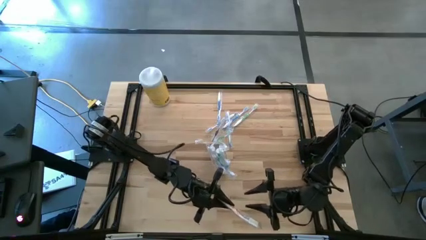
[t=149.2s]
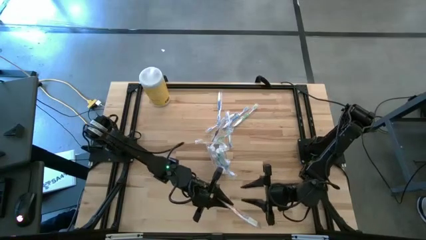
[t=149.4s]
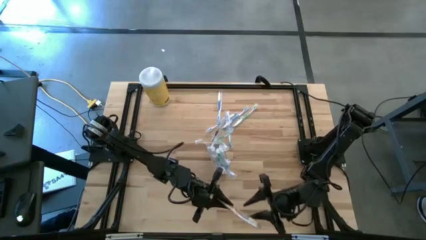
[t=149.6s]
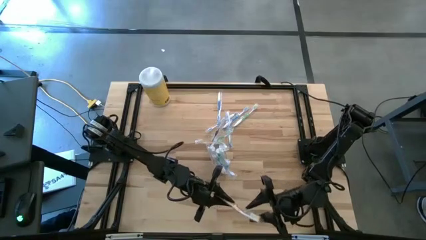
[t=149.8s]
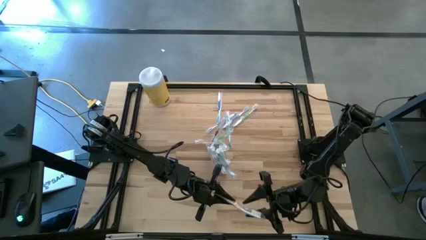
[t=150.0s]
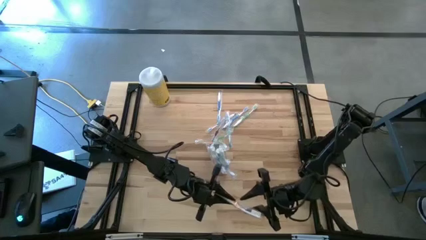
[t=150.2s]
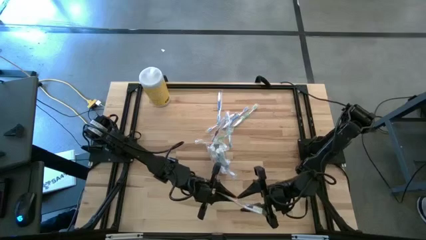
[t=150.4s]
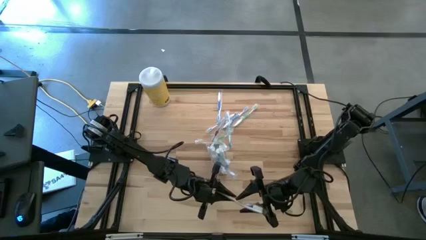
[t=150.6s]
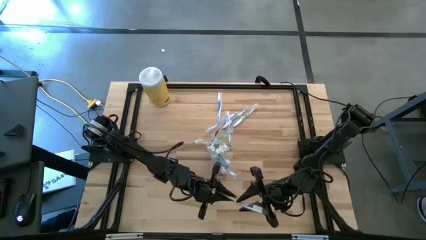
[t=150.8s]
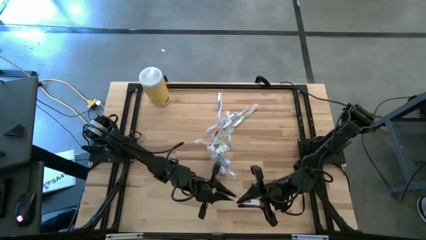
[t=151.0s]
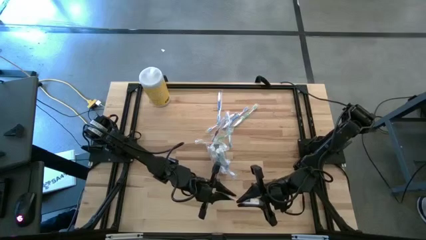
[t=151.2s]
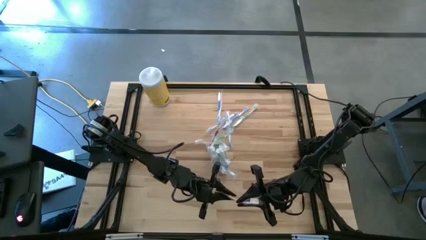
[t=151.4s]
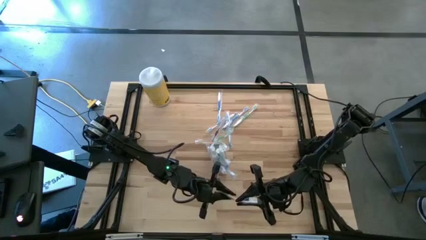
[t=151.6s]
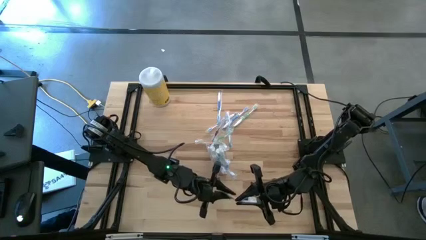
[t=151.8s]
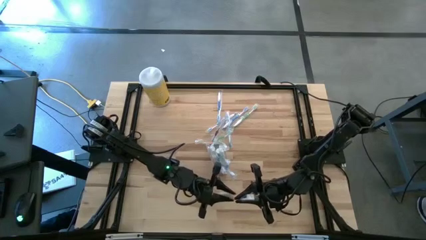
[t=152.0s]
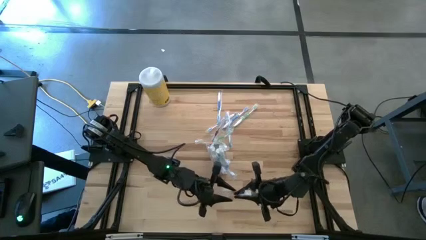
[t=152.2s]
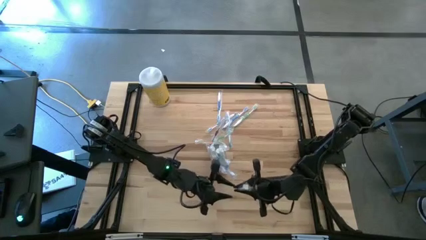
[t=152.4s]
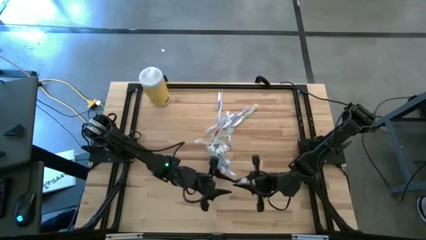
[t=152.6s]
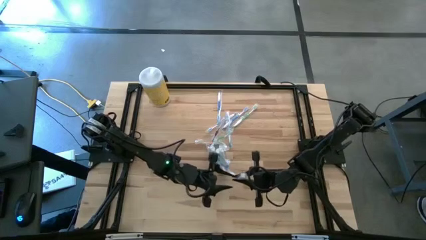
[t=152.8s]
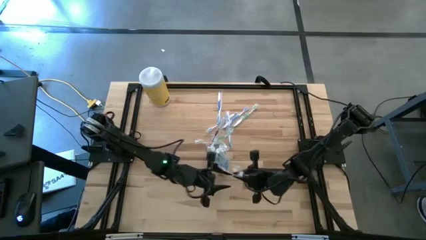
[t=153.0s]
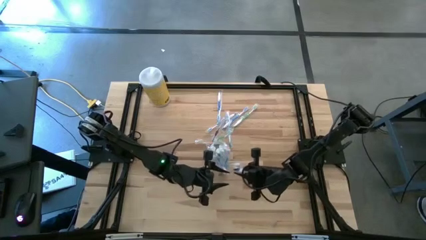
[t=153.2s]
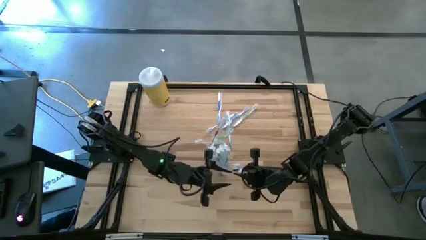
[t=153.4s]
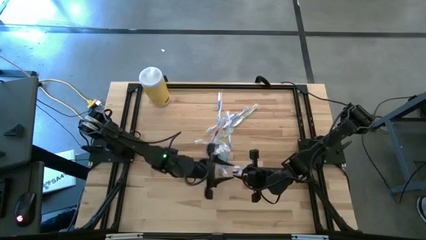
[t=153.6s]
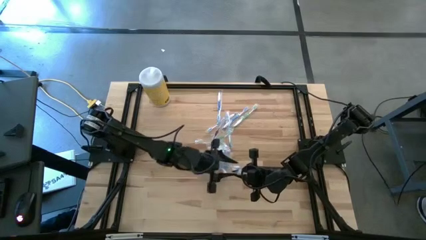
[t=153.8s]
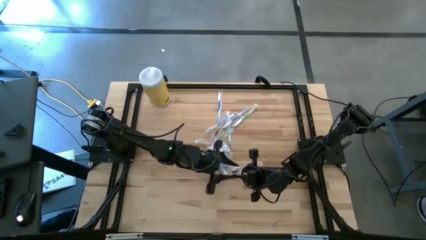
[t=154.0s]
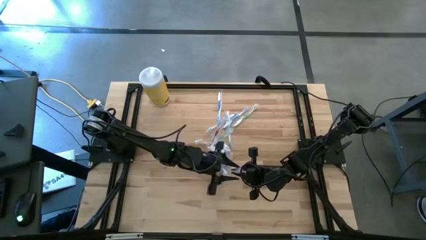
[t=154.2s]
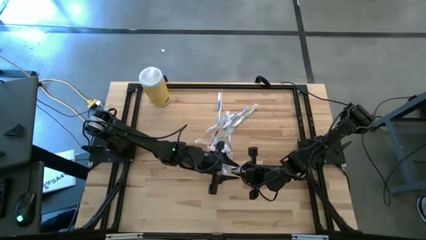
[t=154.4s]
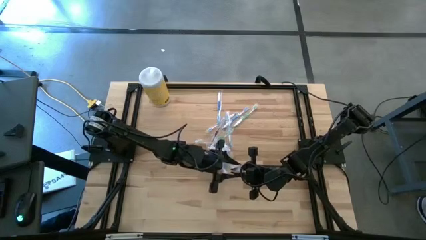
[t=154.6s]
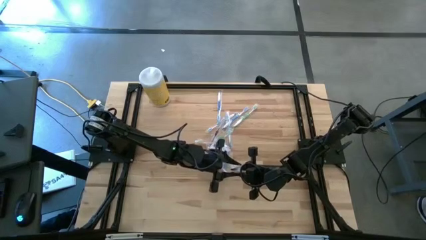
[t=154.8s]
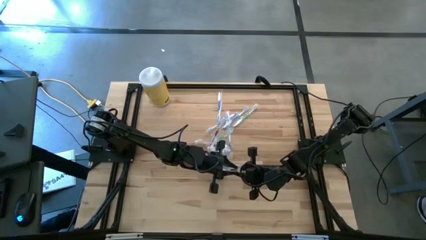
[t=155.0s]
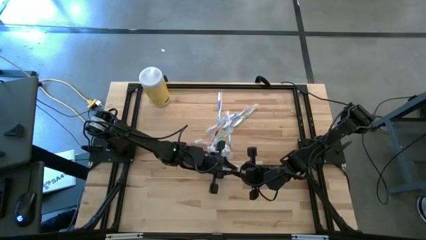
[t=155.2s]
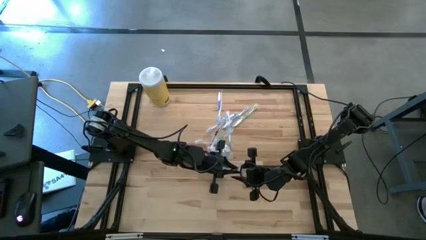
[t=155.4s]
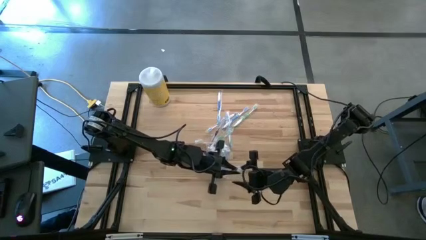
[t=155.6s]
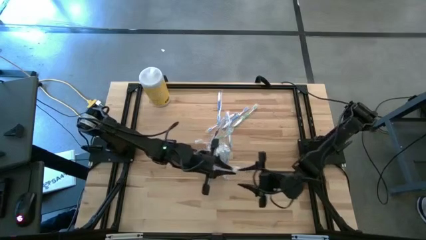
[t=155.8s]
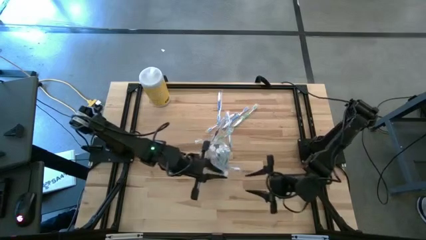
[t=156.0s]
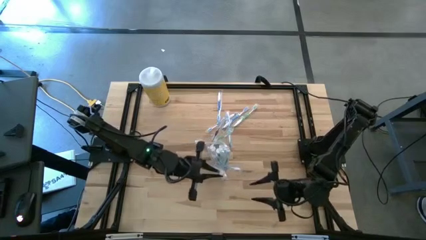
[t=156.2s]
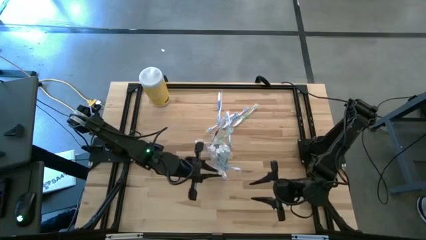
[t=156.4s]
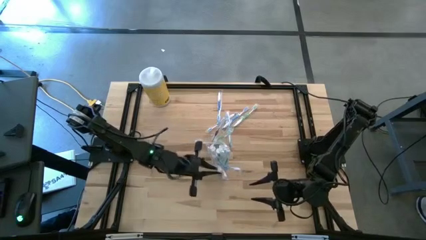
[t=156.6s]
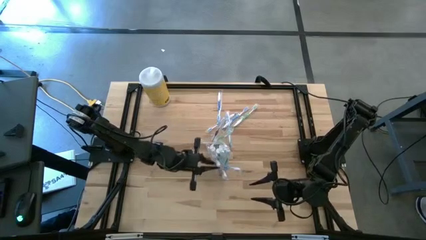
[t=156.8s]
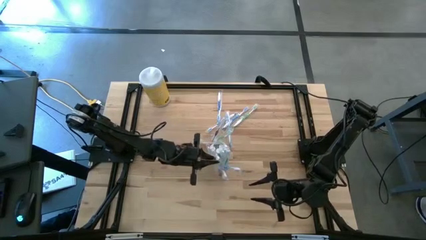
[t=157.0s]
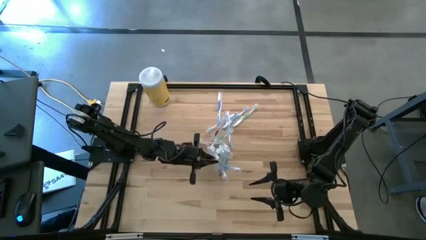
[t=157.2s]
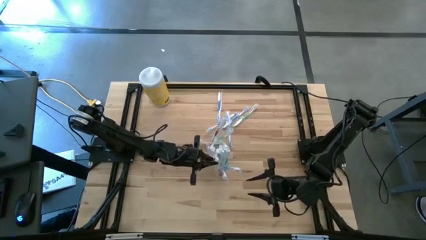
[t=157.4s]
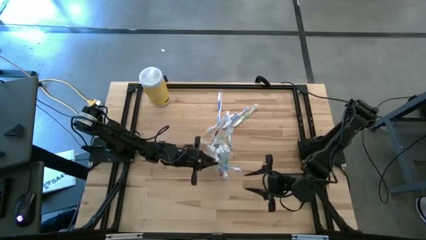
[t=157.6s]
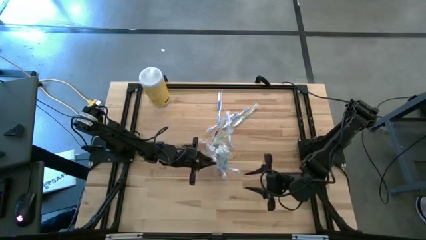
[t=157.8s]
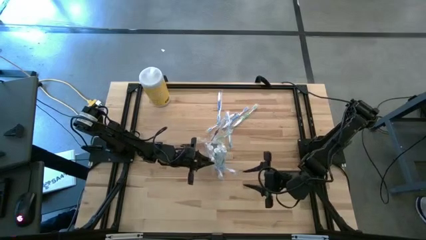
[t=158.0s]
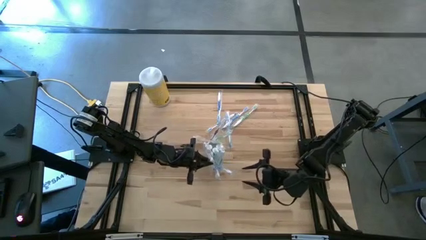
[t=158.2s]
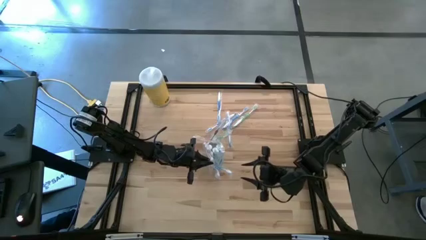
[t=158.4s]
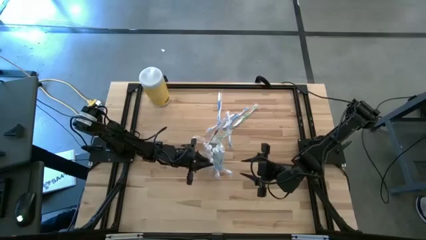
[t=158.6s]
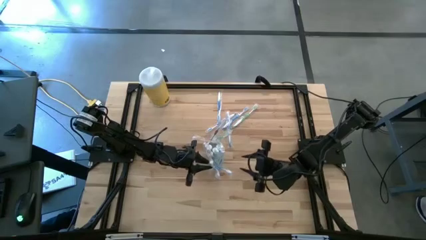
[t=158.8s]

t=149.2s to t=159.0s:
Task: Pick & Place toothbrushing station
Put the orange toothbrush into the transparent organizer
